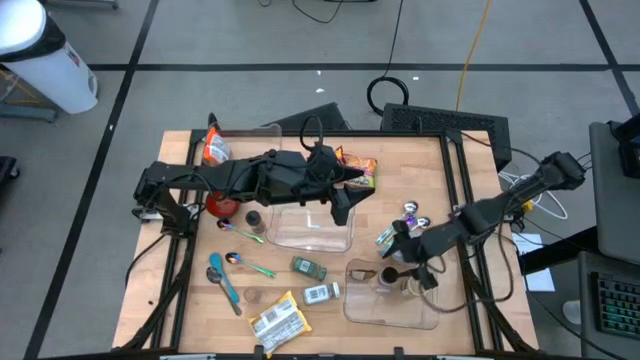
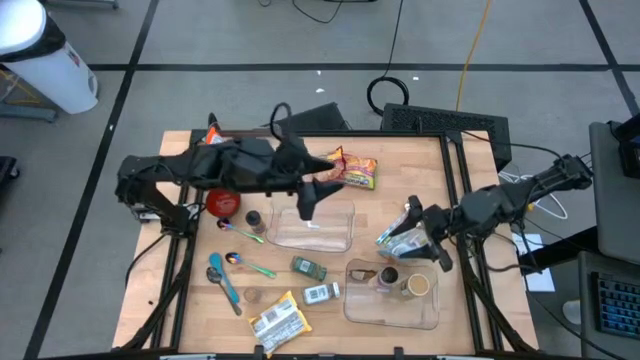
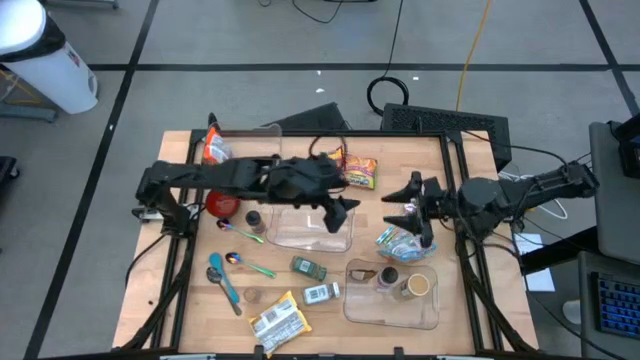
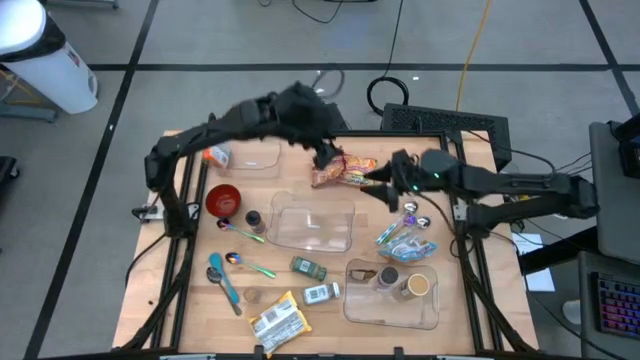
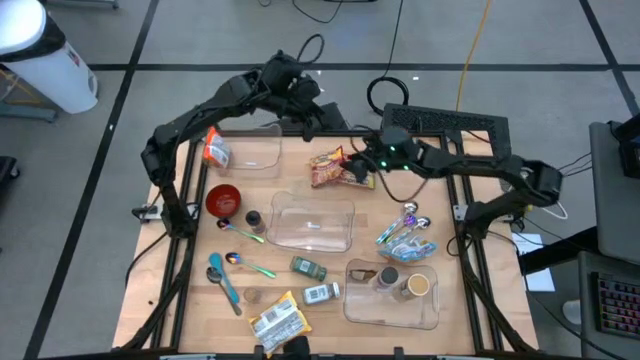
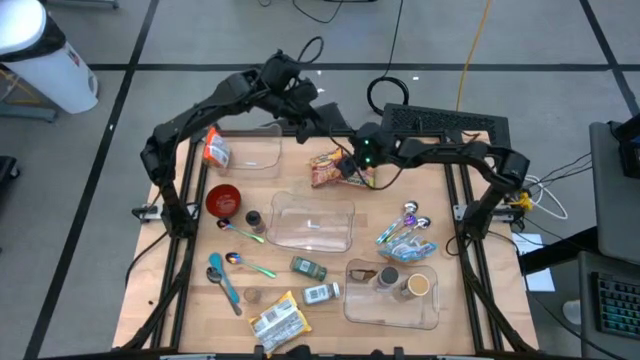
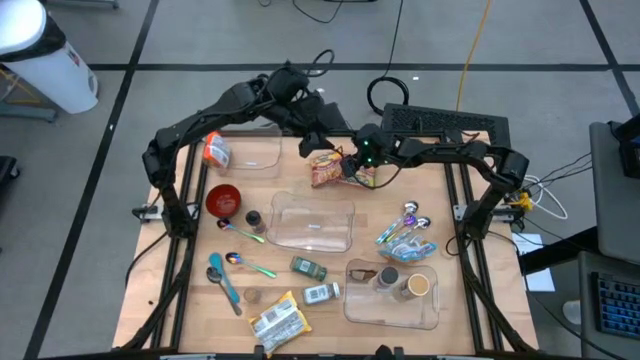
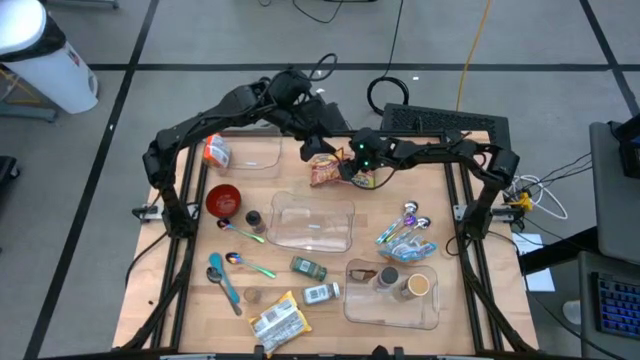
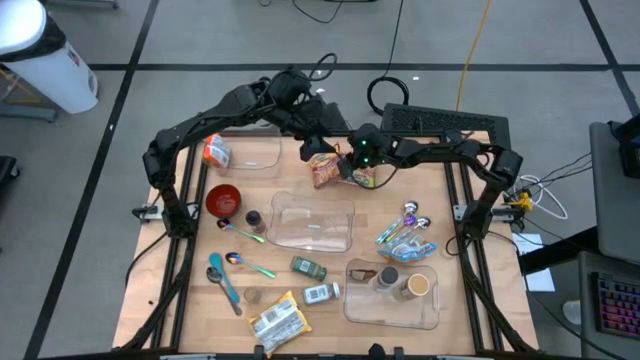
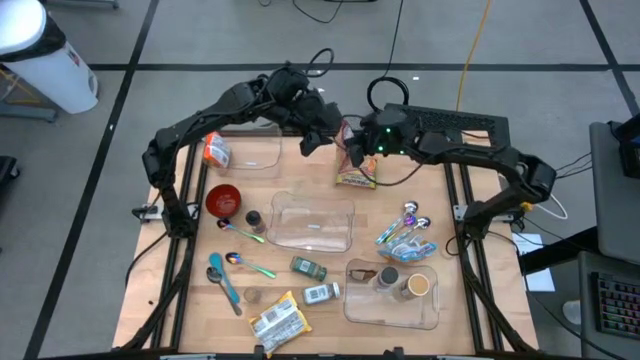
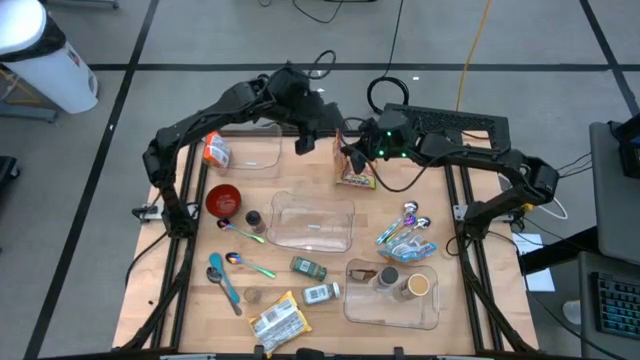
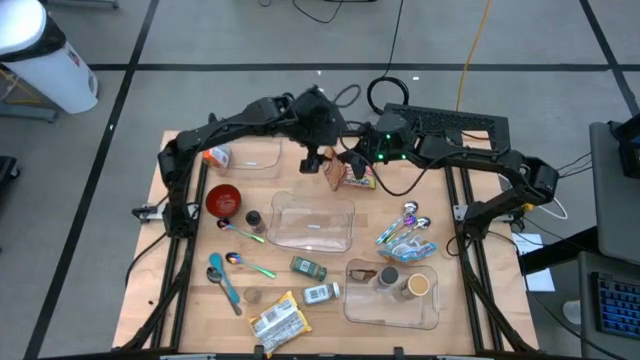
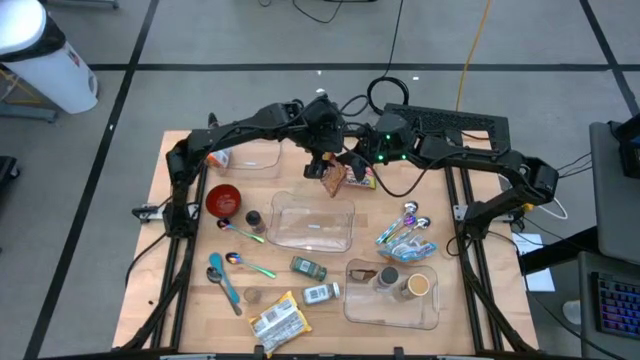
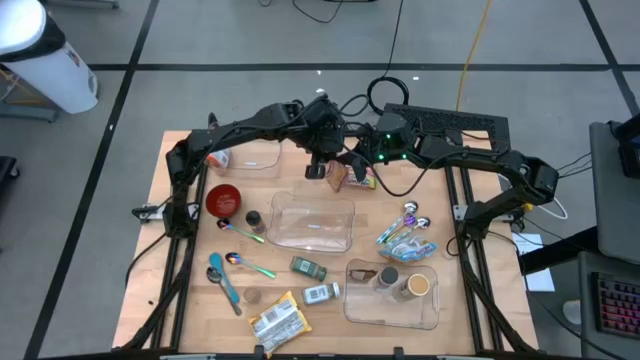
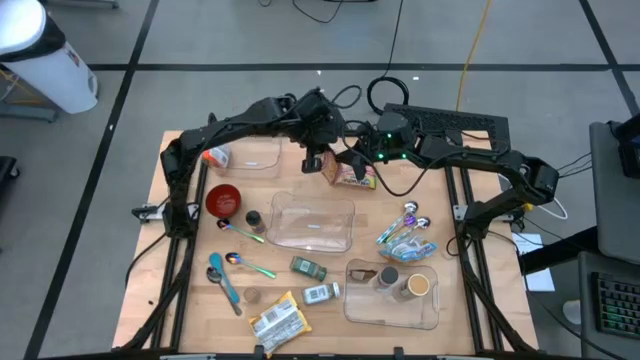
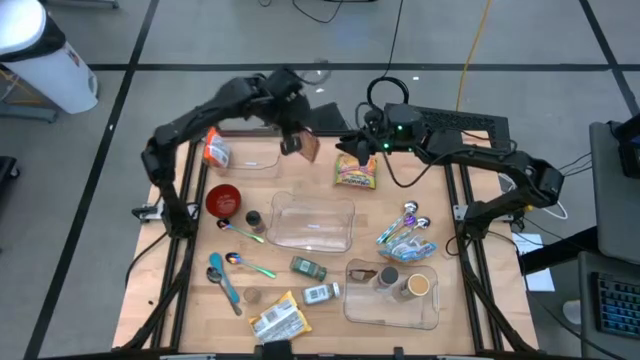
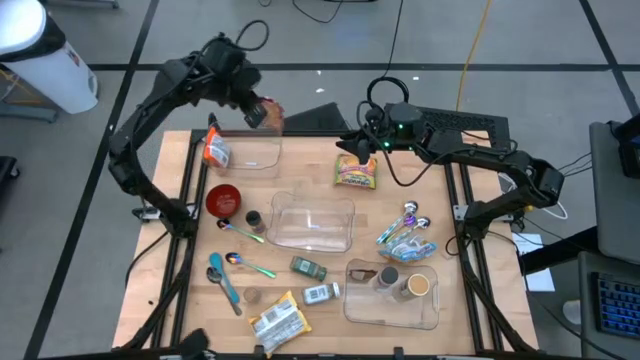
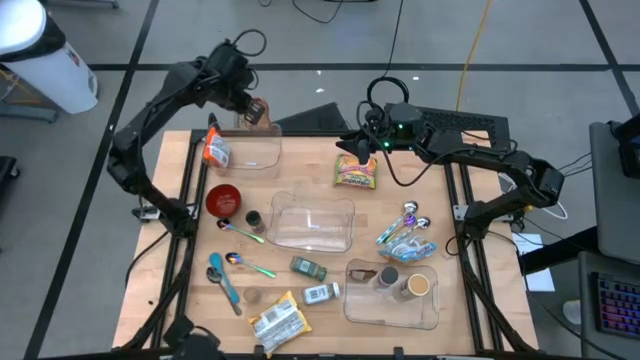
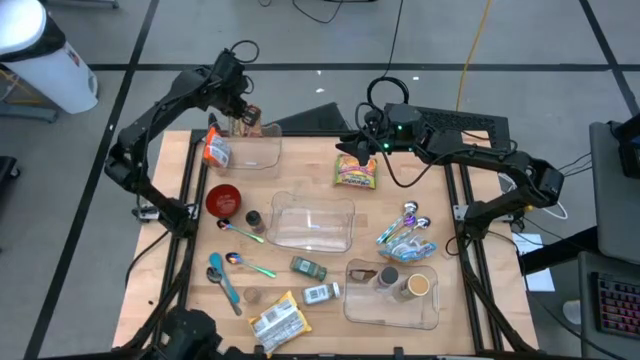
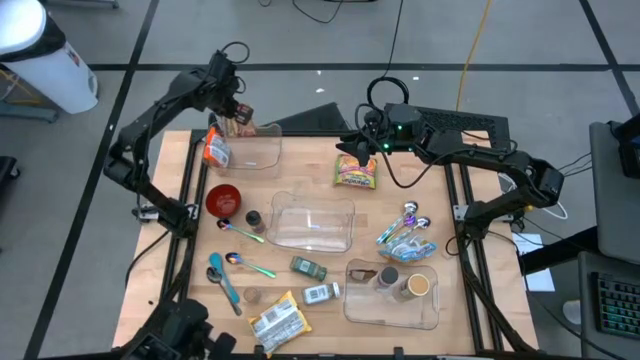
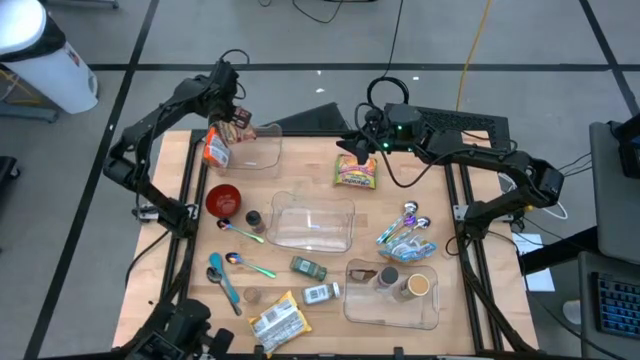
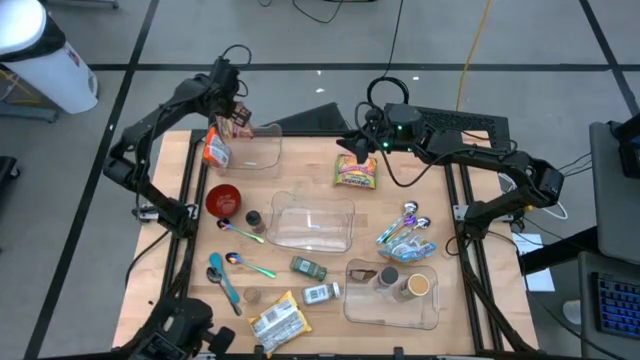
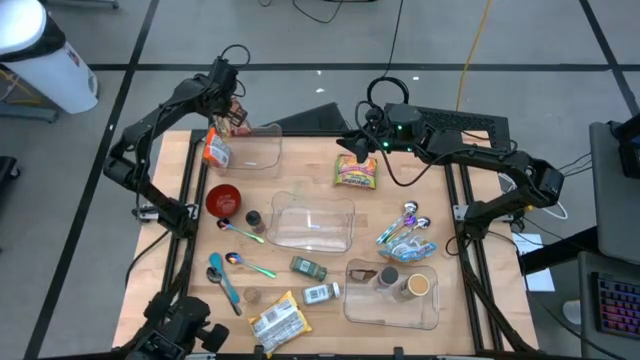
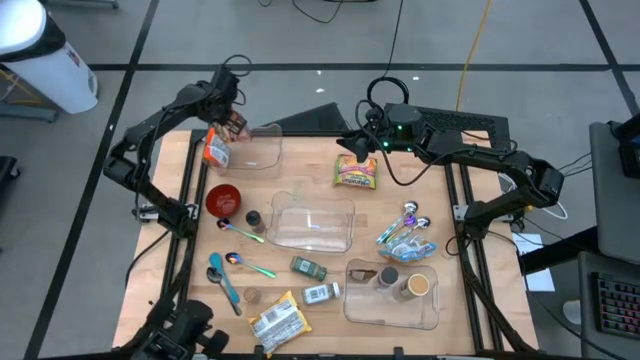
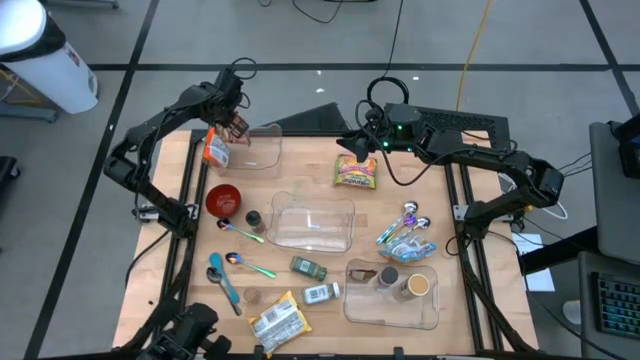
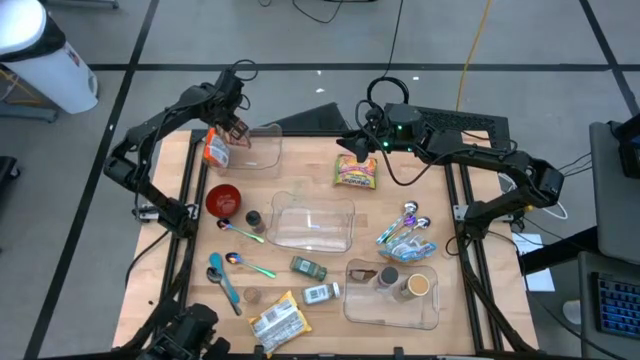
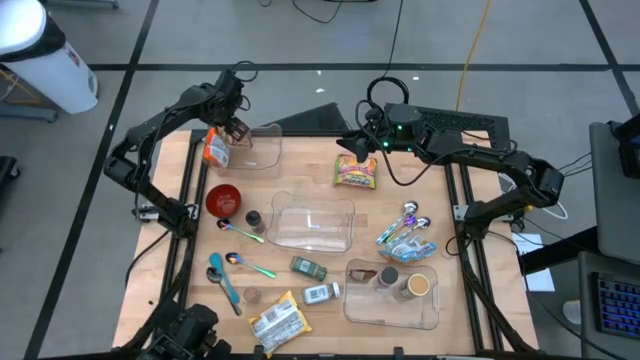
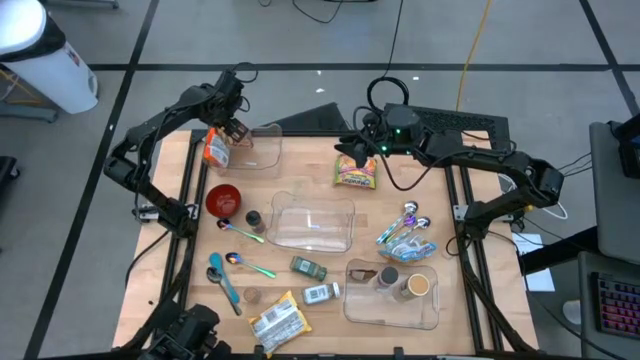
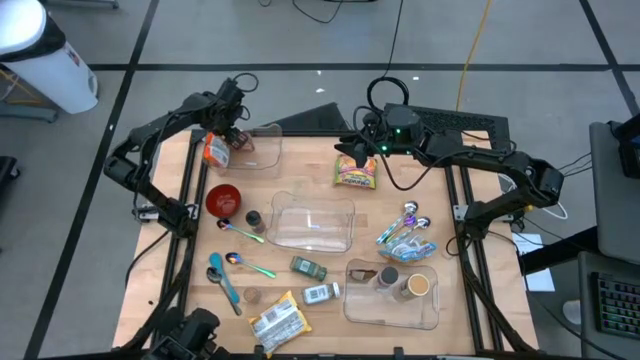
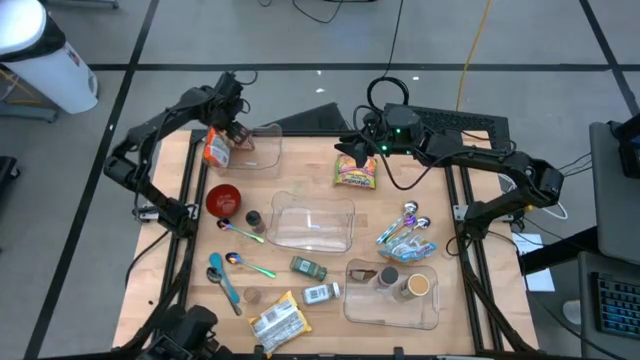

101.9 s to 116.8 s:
Task: Pick & Place Food Item
Put the red noodle pack into the top transparent bin

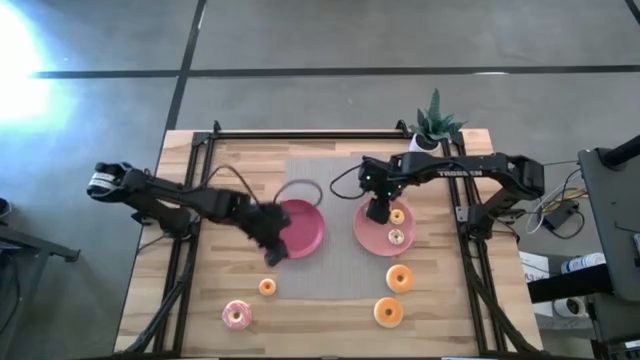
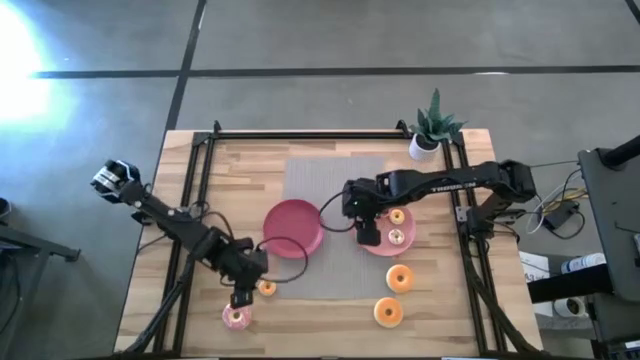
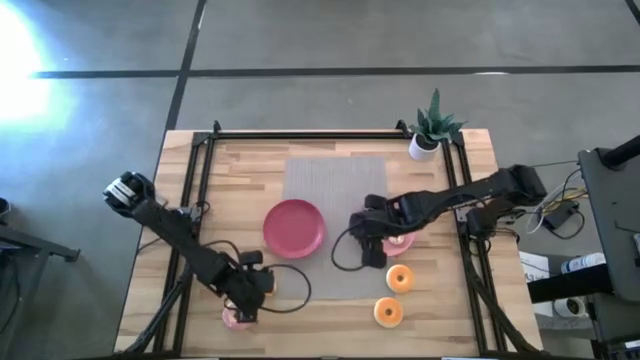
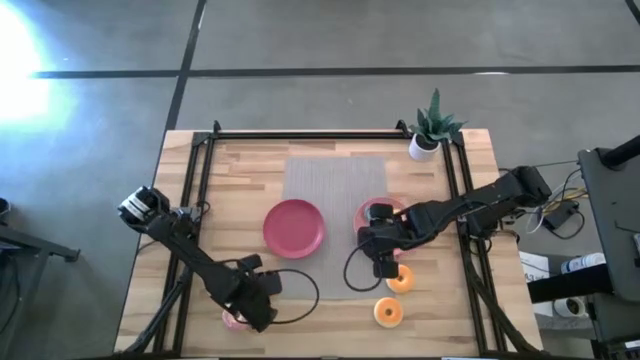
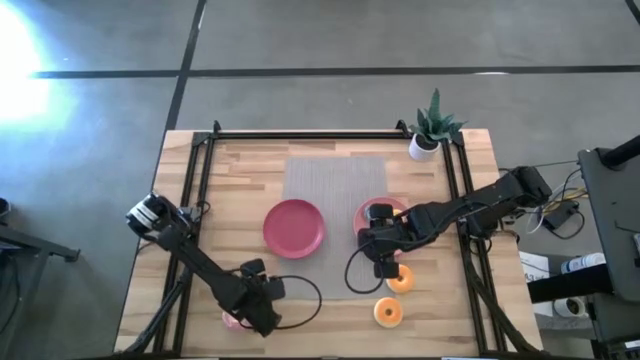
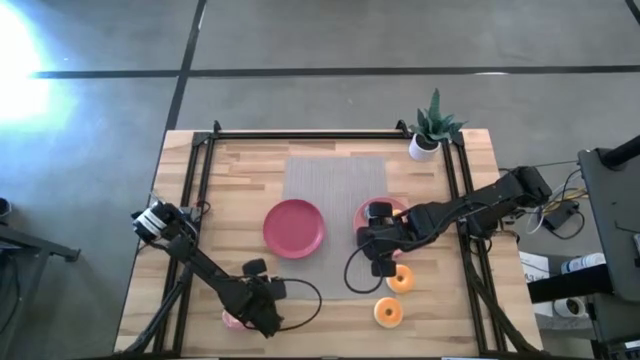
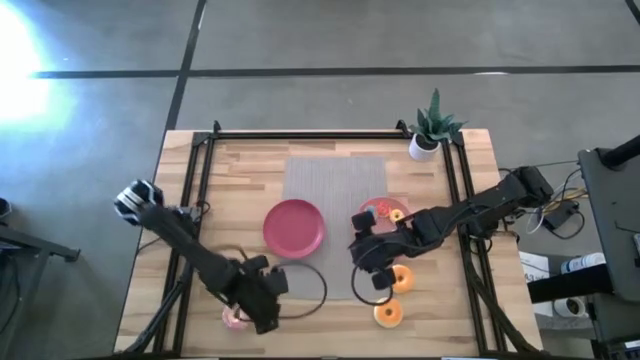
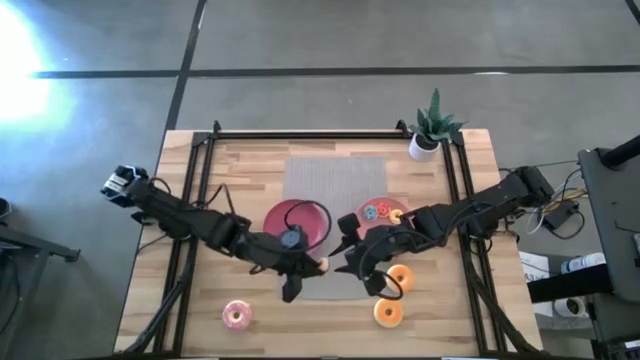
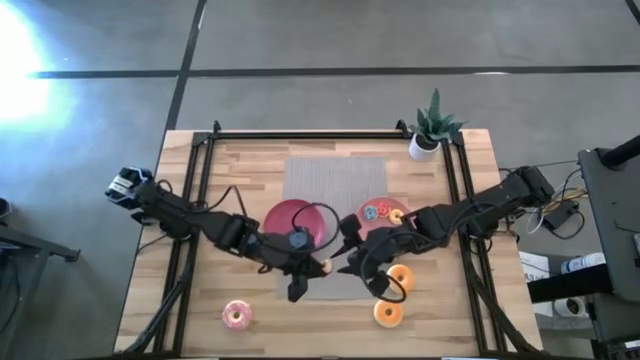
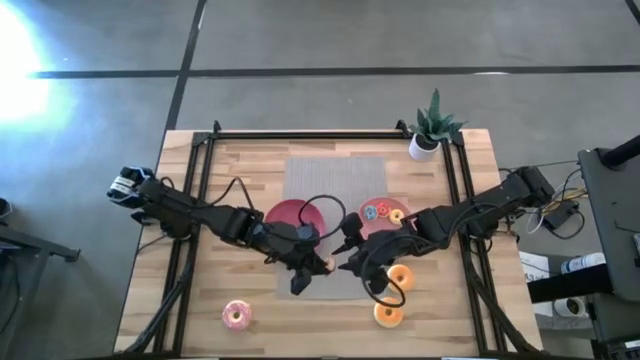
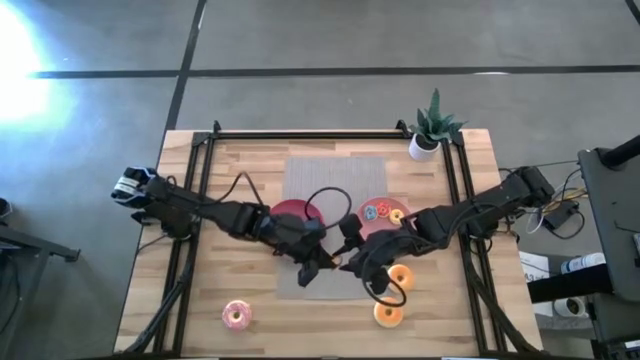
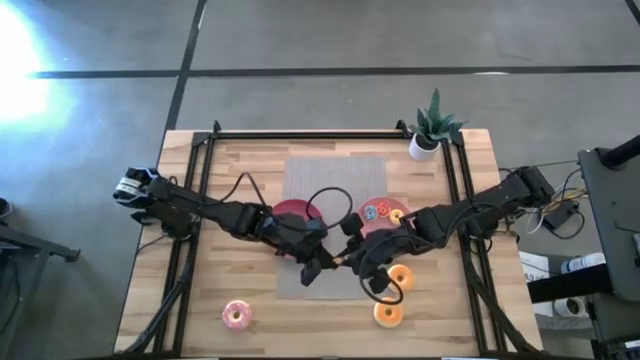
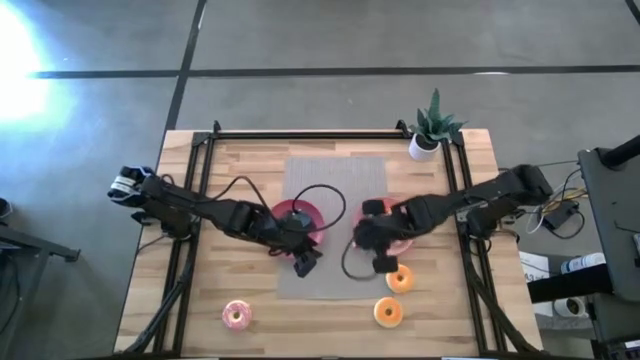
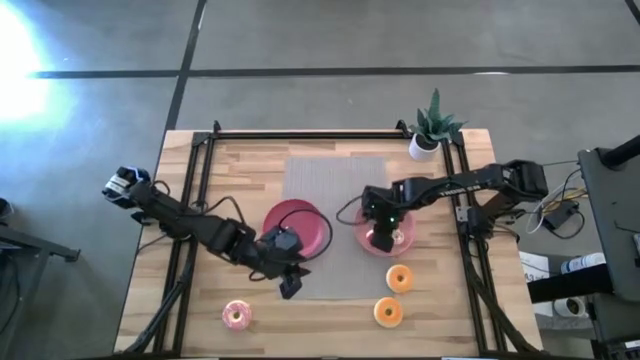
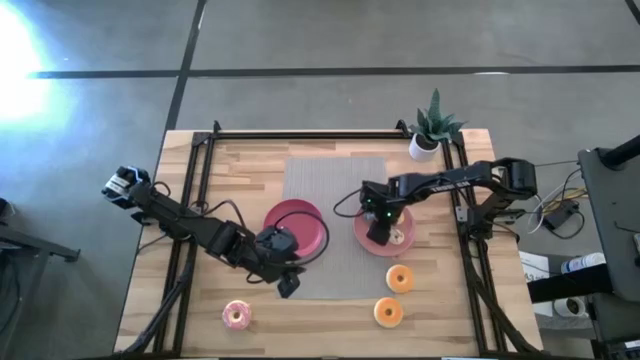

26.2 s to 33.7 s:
Task: Pick & Place donuts
Put the small pink donut on the light pink plate
